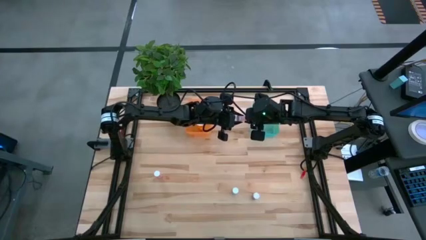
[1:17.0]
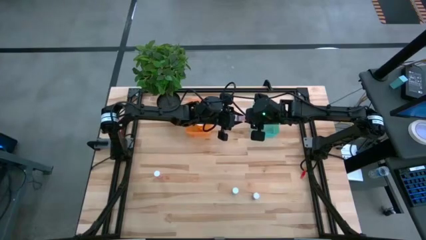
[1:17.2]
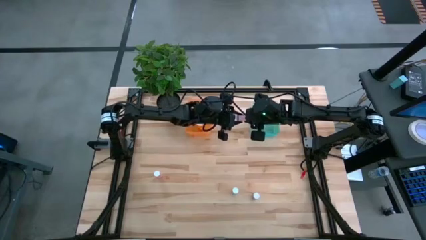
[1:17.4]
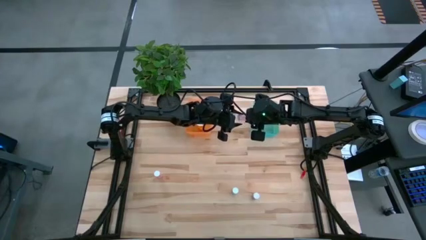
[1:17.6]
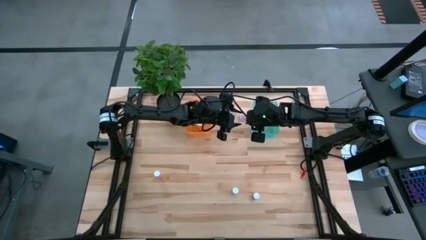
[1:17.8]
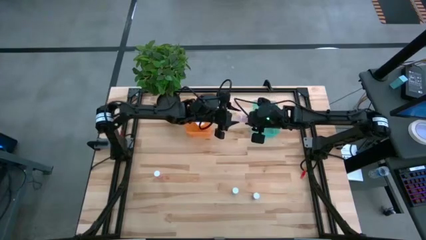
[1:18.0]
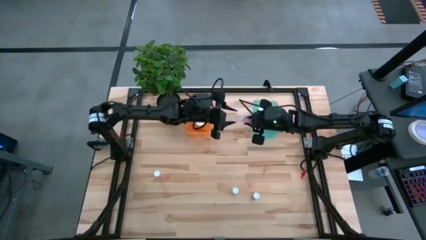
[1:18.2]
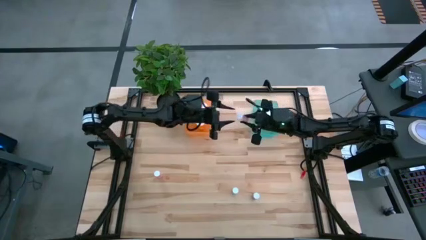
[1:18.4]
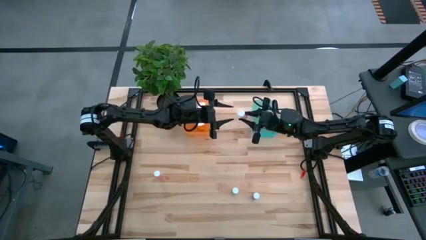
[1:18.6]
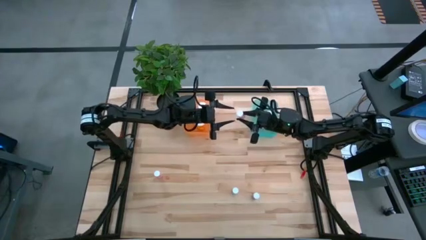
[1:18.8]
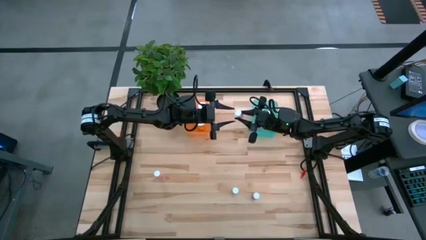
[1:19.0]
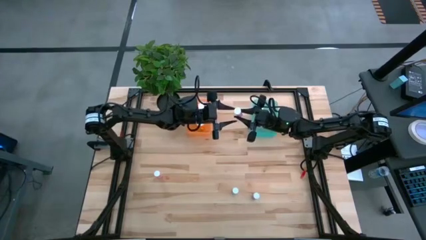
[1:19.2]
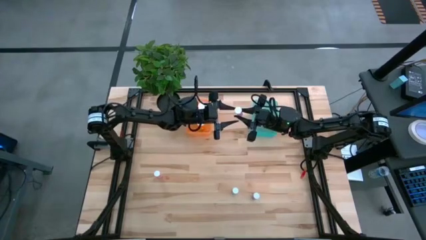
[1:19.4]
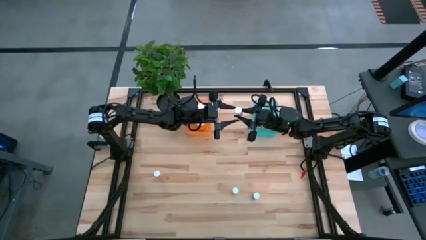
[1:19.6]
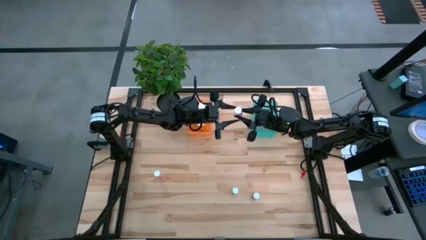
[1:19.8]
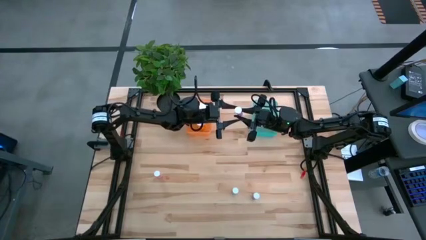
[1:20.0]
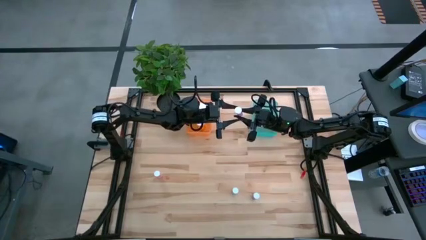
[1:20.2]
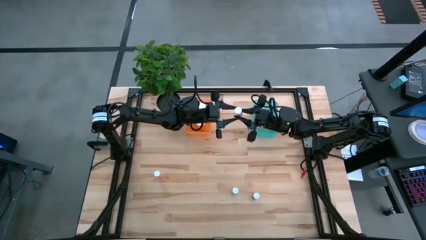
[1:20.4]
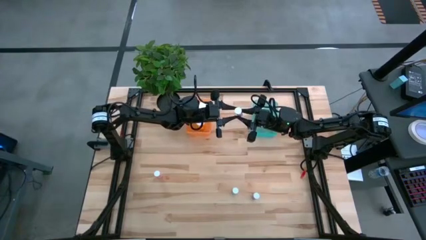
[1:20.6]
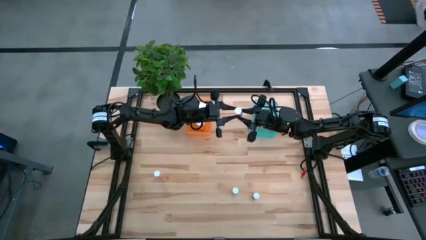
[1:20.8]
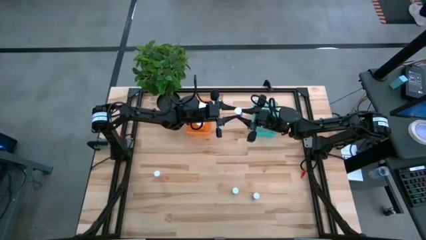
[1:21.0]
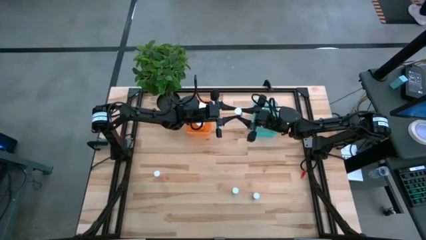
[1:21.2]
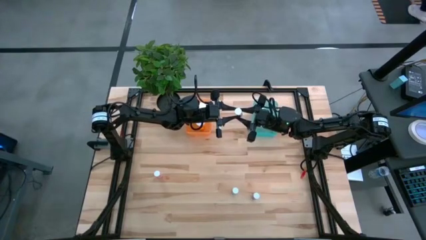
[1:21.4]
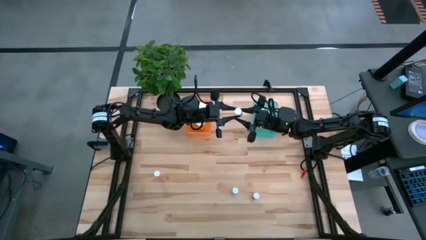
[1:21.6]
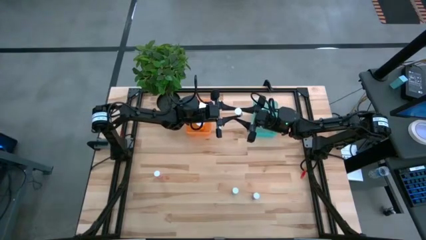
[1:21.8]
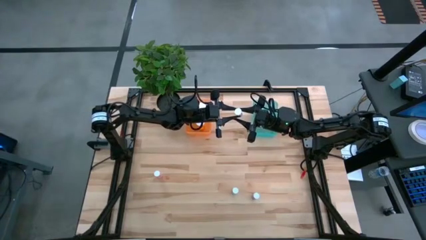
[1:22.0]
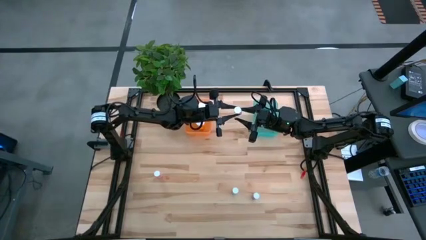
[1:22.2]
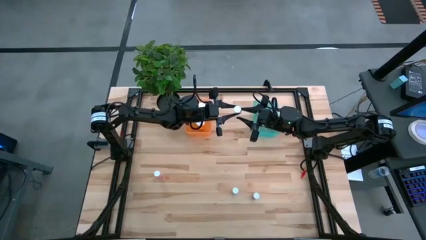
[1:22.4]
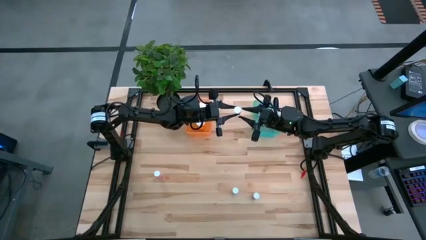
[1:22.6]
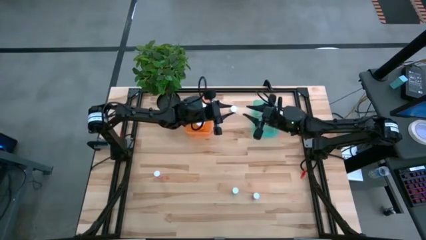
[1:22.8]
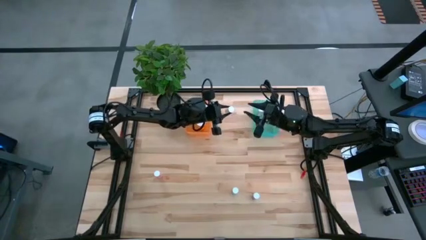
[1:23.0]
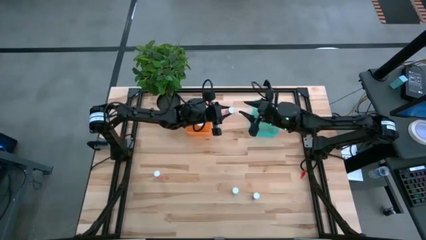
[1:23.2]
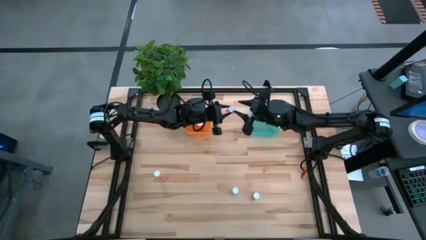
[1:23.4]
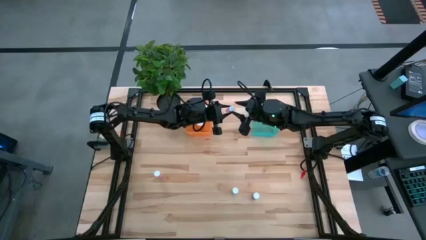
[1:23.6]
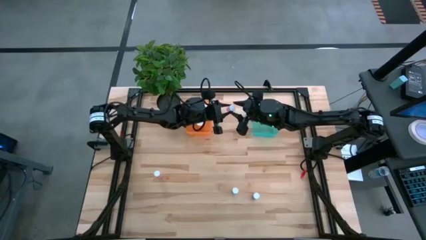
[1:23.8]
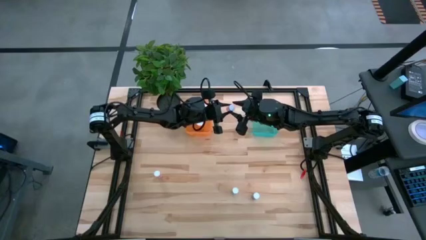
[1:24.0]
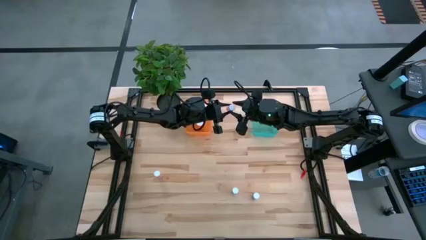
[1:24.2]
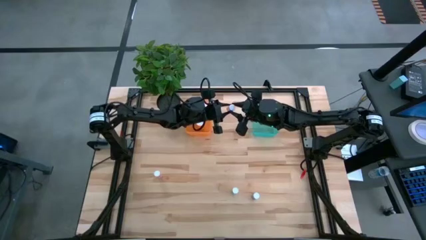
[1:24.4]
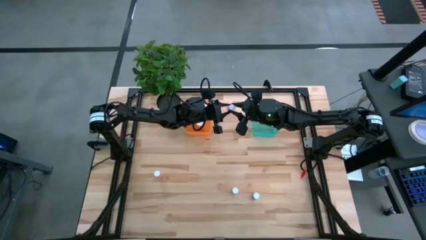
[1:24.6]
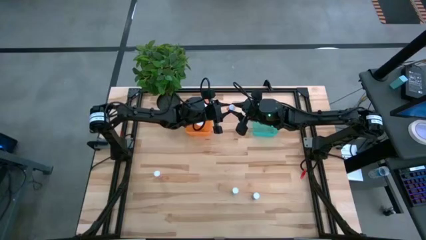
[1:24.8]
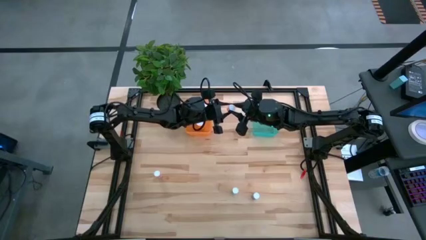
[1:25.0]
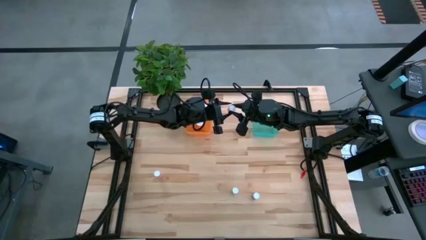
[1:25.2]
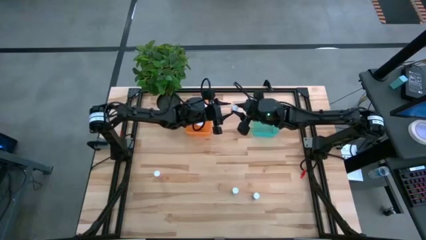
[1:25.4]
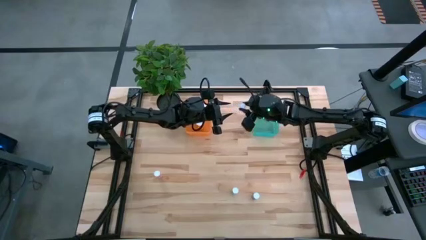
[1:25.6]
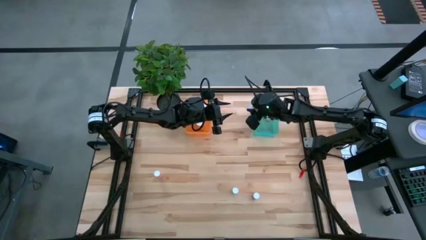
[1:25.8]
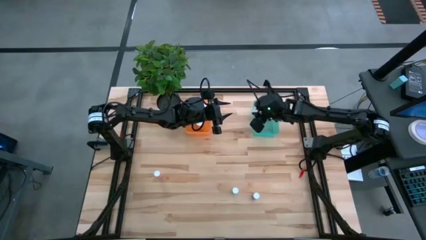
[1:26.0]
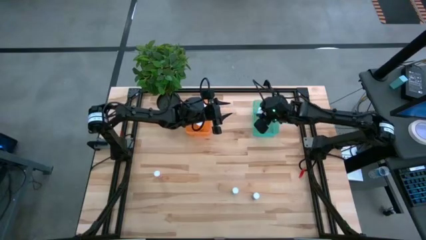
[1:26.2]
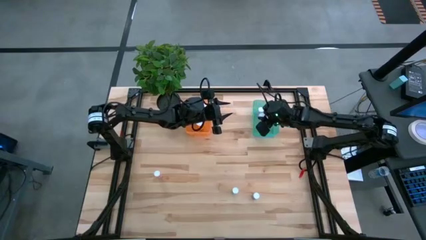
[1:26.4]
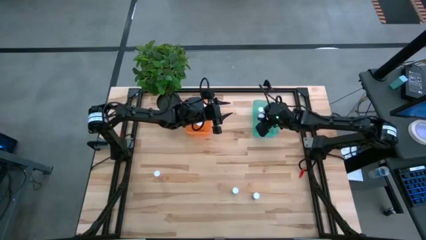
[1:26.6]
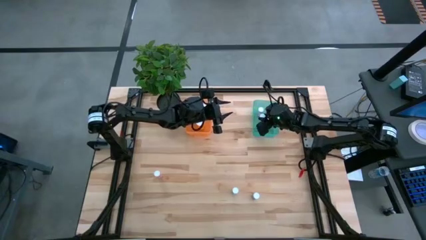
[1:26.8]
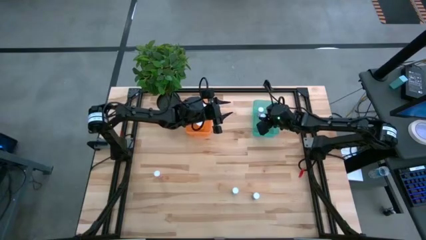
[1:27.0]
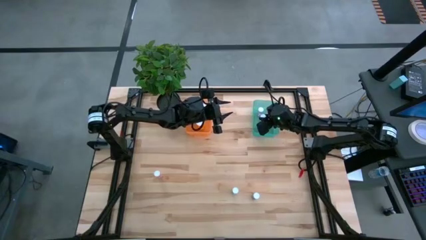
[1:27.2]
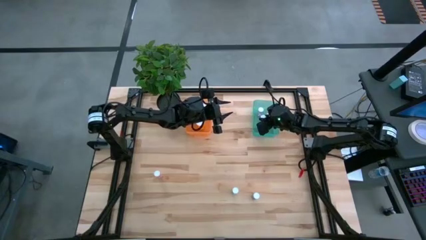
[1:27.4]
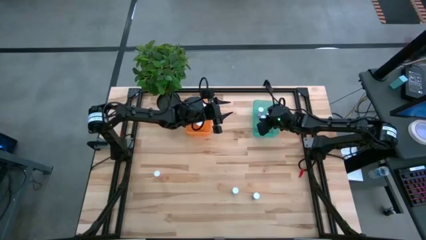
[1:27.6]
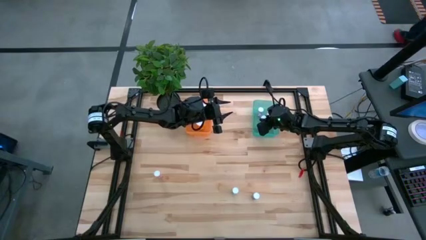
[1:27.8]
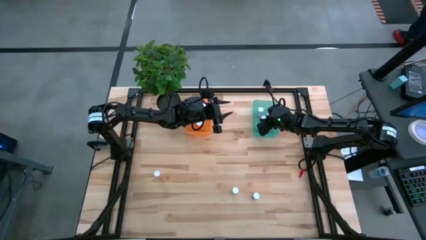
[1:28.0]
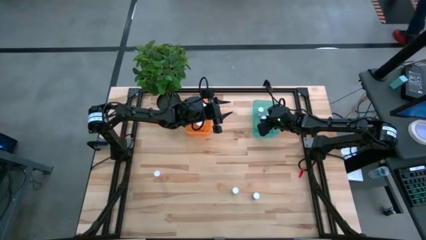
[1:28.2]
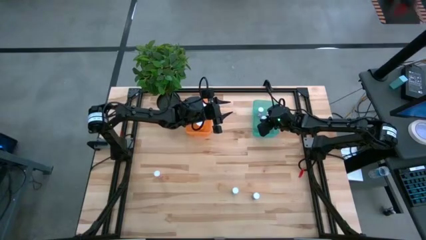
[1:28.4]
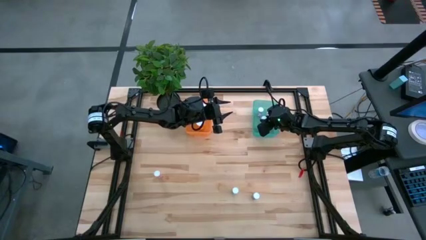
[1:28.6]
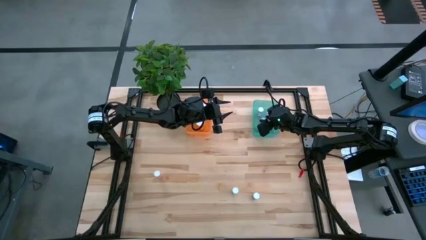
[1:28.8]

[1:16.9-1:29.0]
Task: Pick and place medicine bottles into bin by pill shape (circle, oval)
Put the bottom pink tablet bottle into the green bin

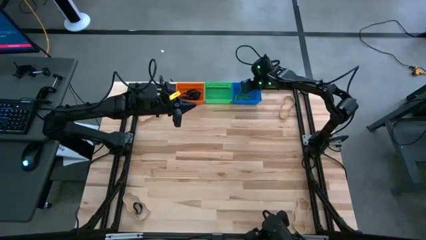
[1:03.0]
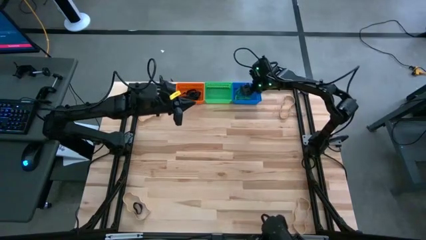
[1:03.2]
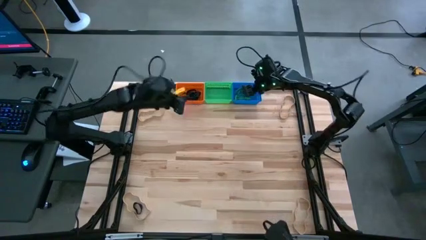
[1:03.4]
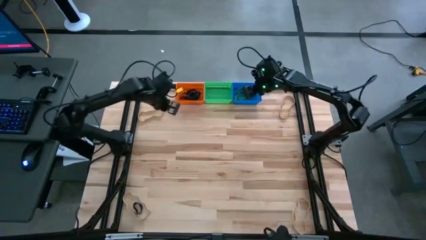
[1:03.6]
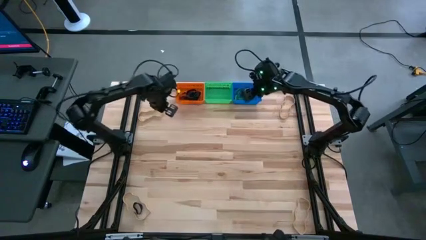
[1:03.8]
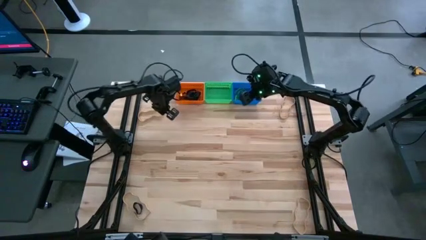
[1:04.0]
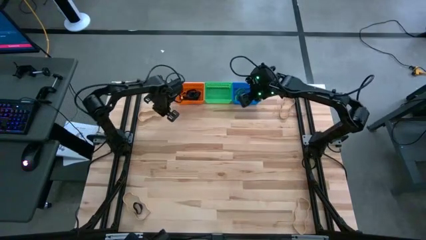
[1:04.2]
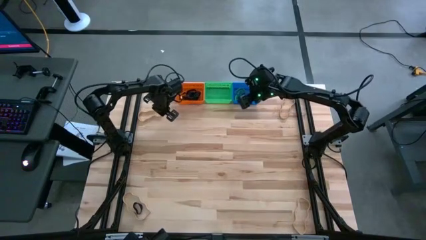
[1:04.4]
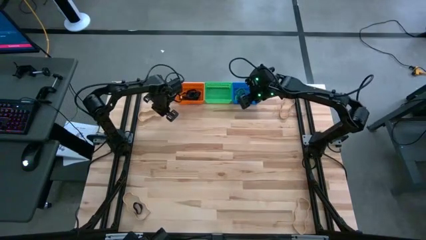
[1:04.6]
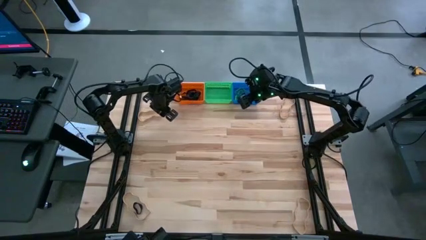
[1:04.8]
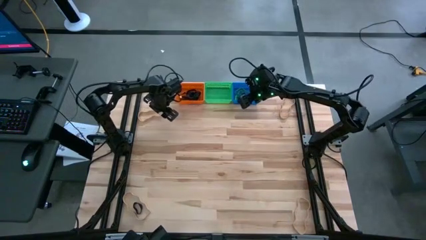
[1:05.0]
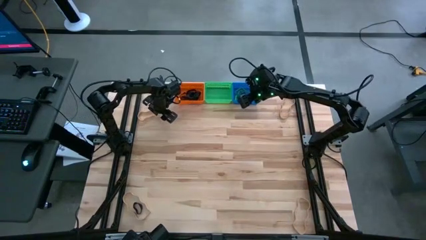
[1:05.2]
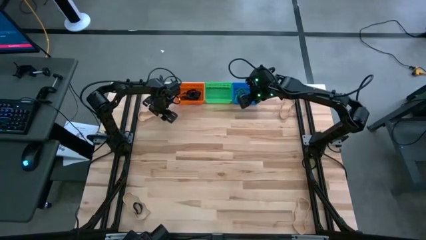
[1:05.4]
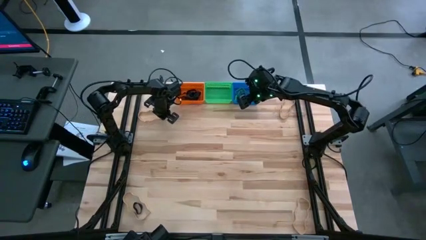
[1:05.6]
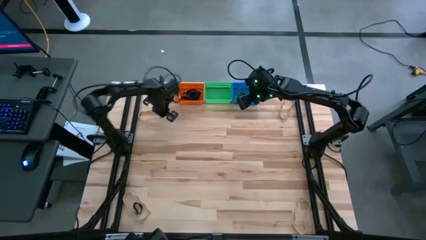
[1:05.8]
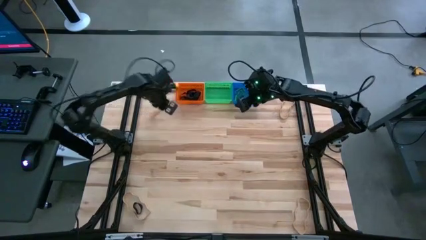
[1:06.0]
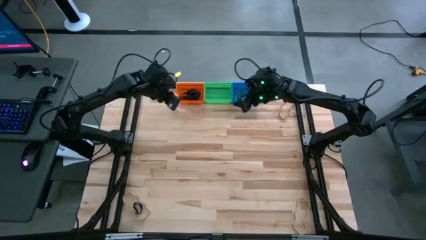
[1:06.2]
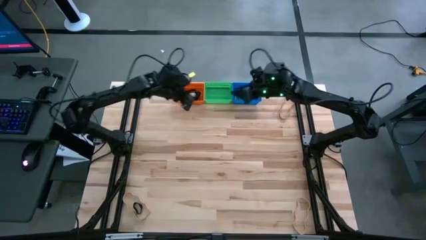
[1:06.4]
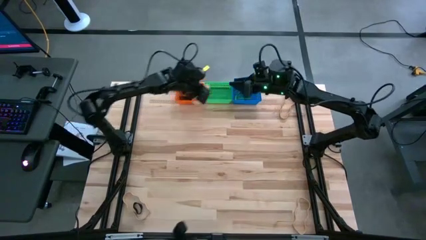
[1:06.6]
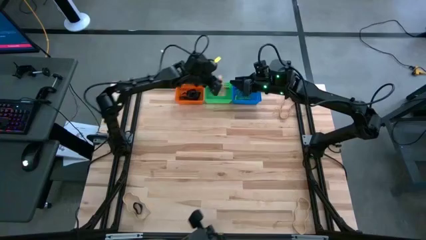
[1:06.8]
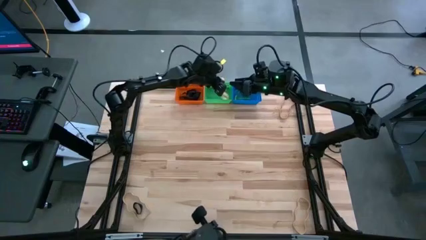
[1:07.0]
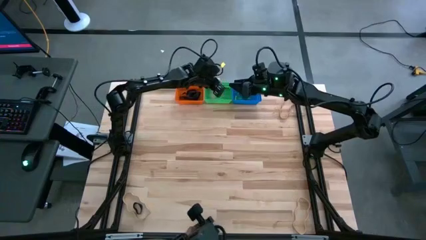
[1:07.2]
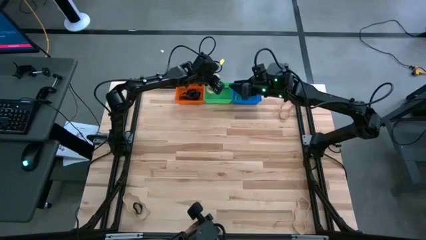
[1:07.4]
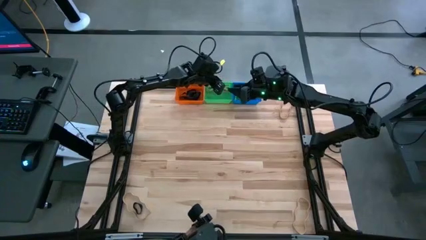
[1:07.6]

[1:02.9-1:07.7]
Task: Sort rubber bands into baskets
Put the white rubber band into the green basket
